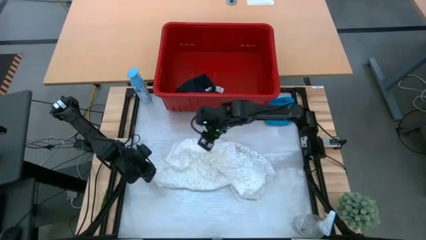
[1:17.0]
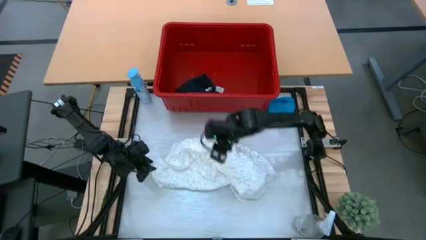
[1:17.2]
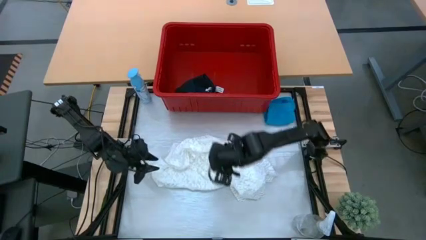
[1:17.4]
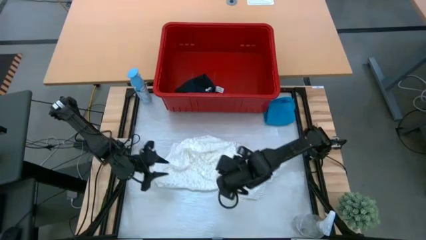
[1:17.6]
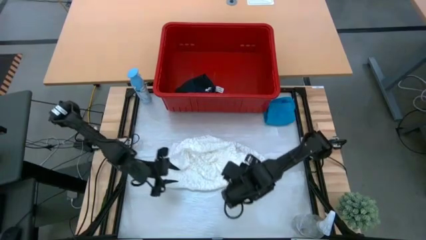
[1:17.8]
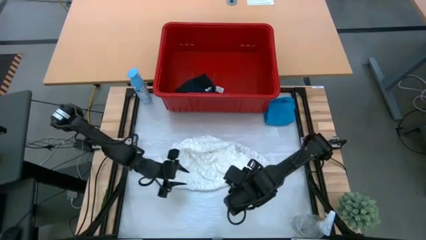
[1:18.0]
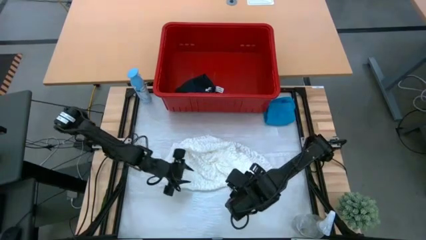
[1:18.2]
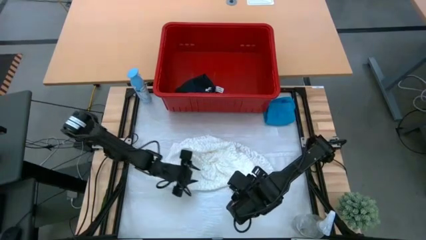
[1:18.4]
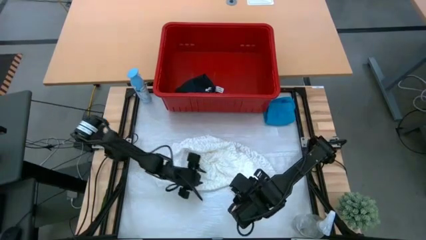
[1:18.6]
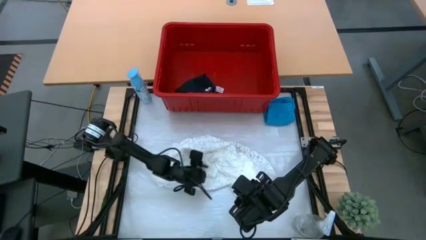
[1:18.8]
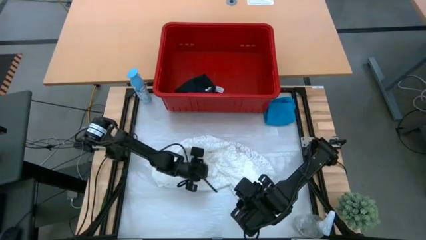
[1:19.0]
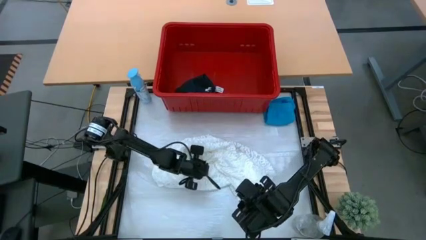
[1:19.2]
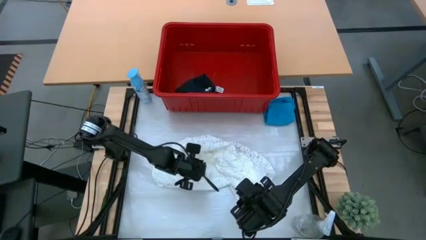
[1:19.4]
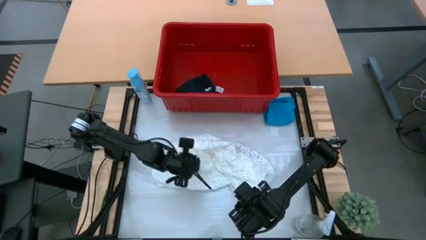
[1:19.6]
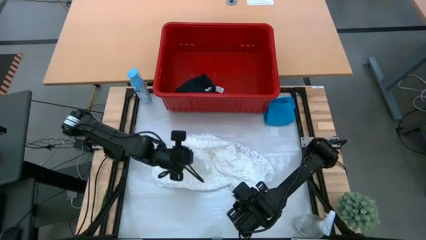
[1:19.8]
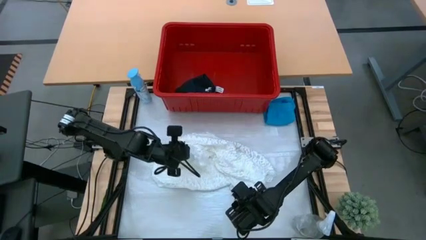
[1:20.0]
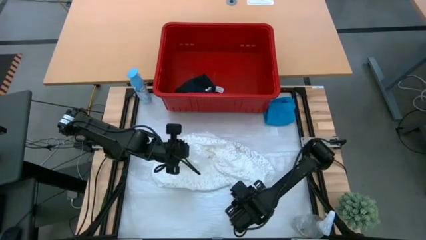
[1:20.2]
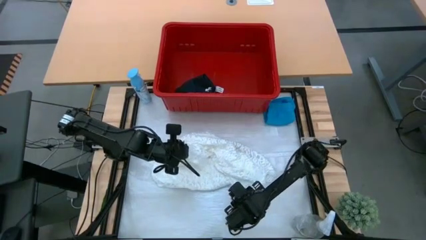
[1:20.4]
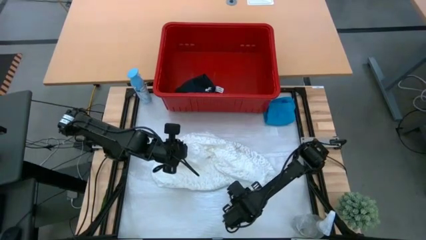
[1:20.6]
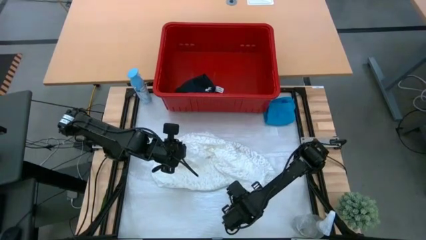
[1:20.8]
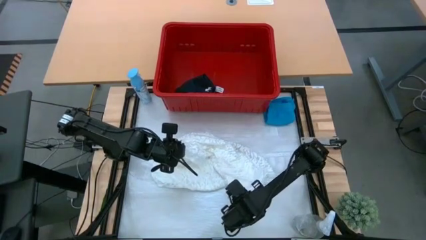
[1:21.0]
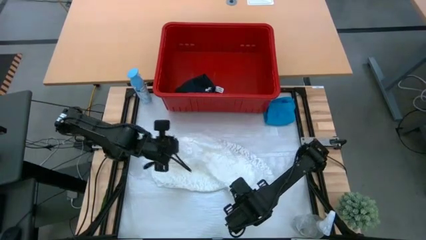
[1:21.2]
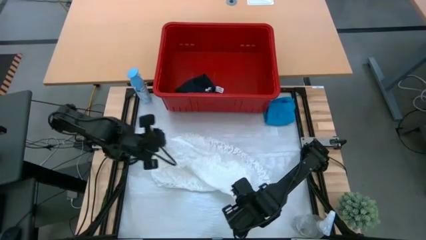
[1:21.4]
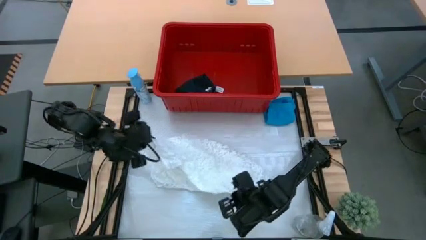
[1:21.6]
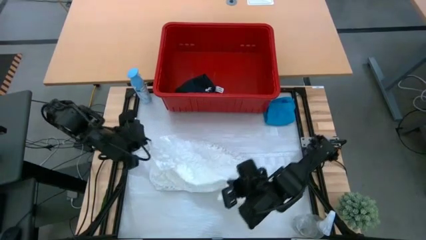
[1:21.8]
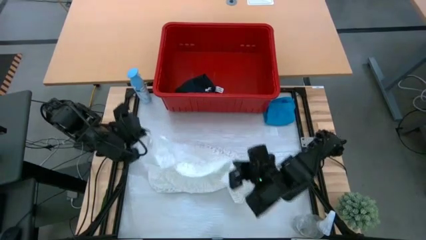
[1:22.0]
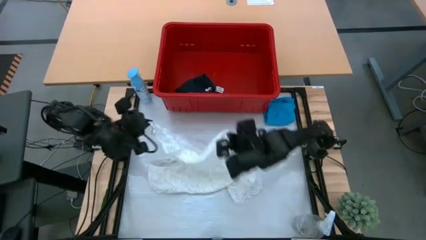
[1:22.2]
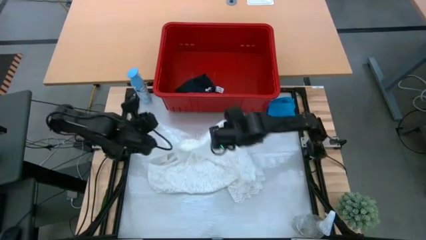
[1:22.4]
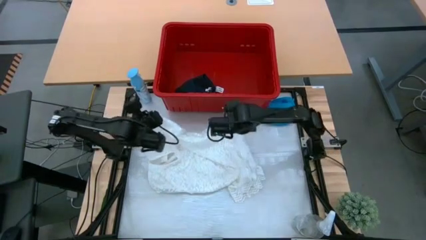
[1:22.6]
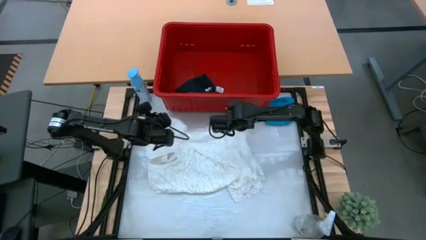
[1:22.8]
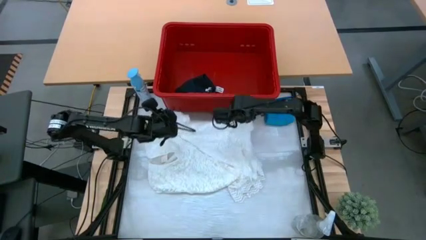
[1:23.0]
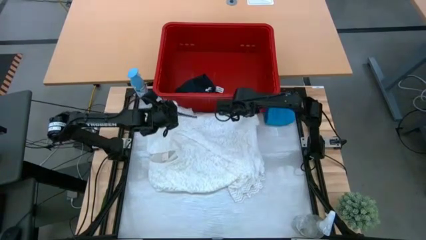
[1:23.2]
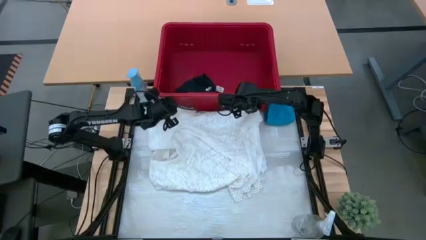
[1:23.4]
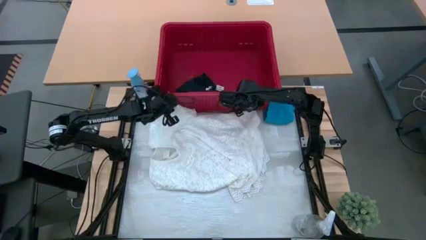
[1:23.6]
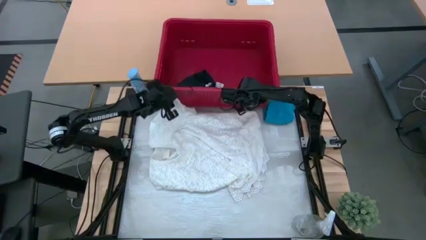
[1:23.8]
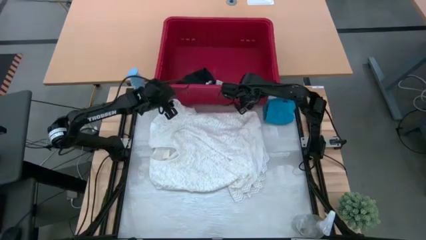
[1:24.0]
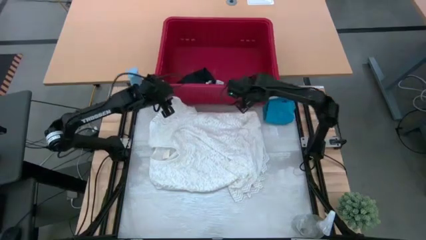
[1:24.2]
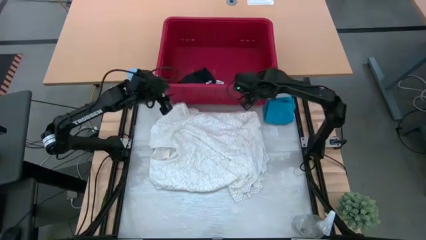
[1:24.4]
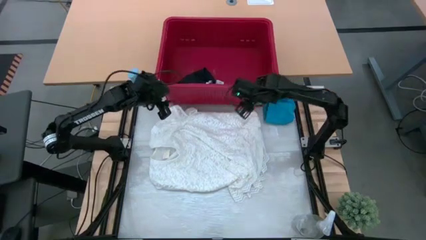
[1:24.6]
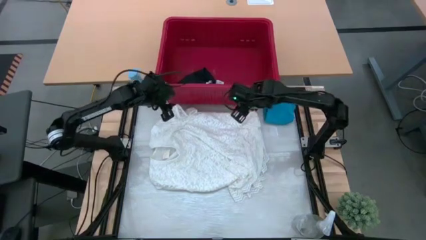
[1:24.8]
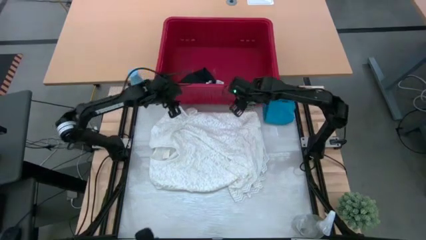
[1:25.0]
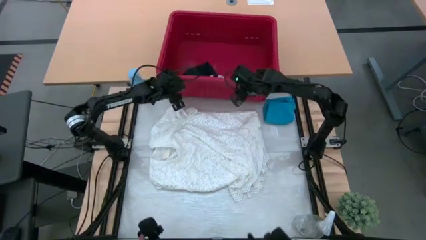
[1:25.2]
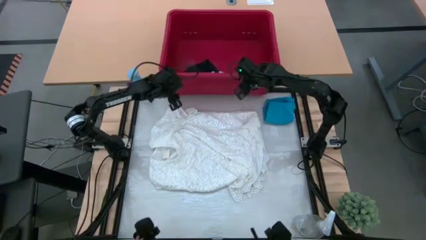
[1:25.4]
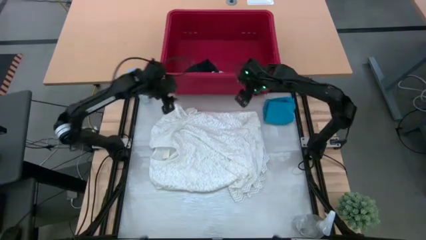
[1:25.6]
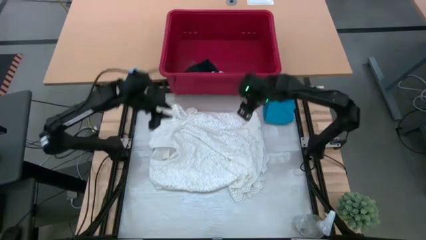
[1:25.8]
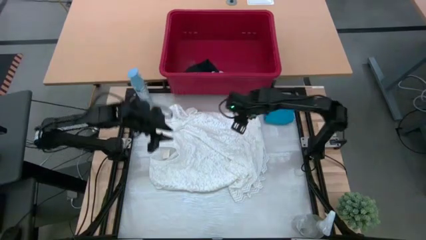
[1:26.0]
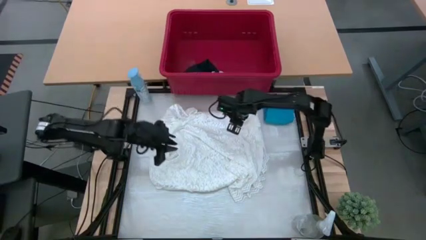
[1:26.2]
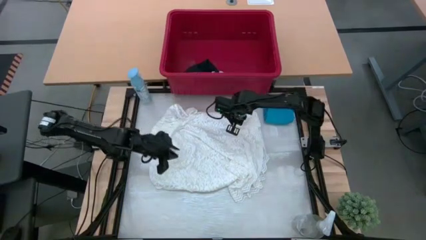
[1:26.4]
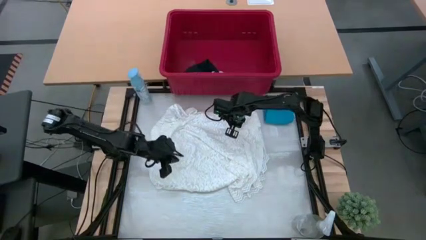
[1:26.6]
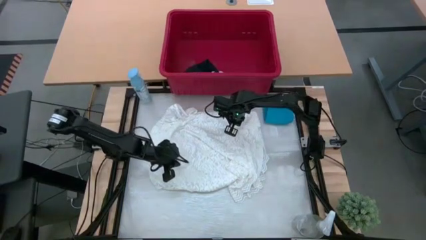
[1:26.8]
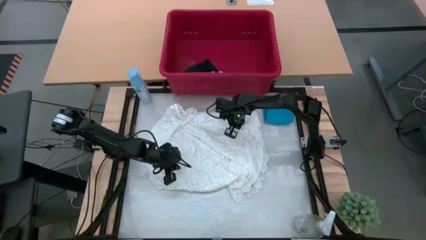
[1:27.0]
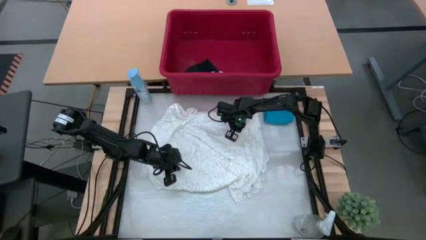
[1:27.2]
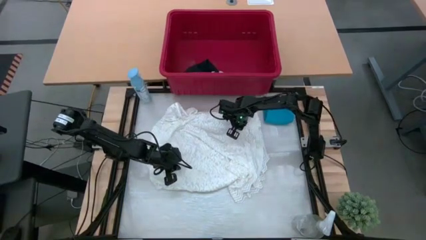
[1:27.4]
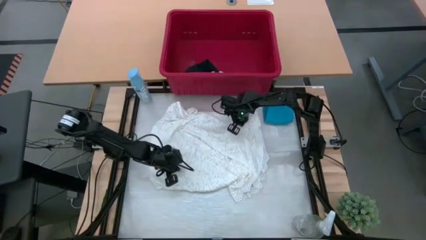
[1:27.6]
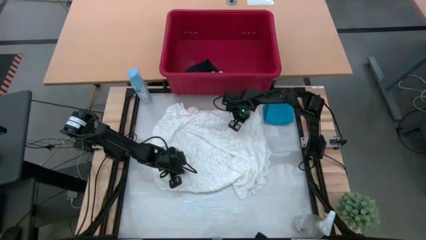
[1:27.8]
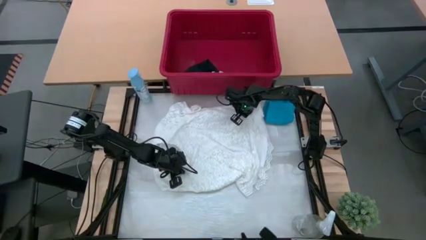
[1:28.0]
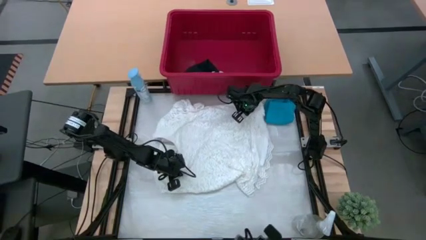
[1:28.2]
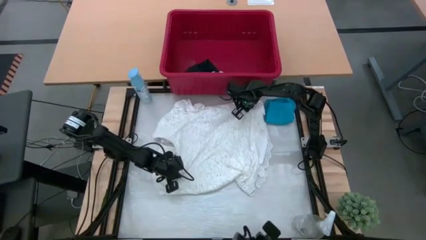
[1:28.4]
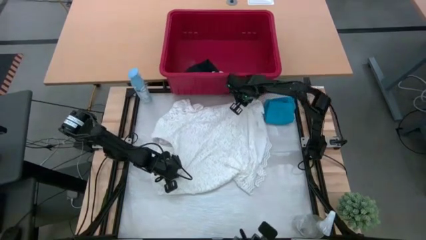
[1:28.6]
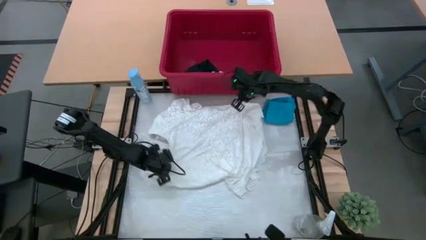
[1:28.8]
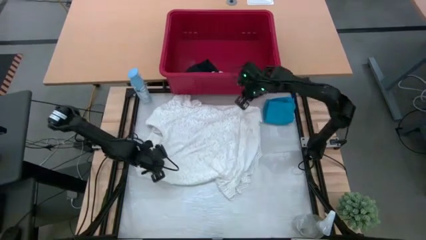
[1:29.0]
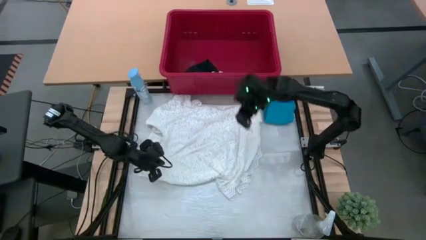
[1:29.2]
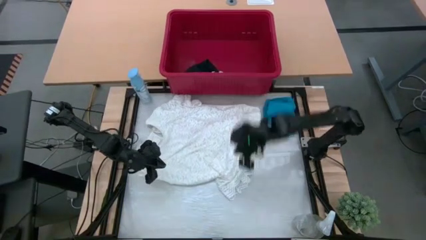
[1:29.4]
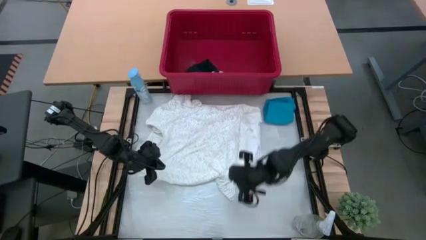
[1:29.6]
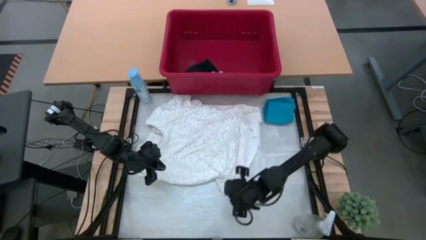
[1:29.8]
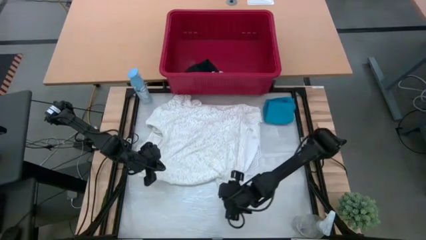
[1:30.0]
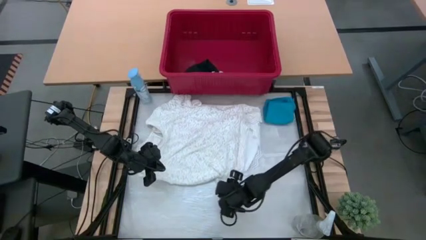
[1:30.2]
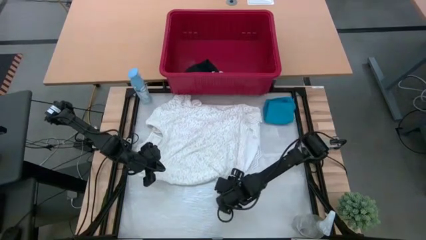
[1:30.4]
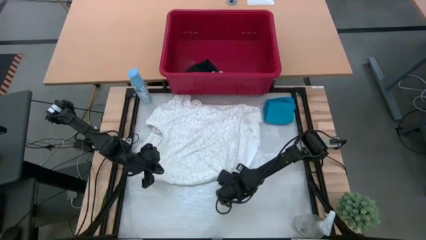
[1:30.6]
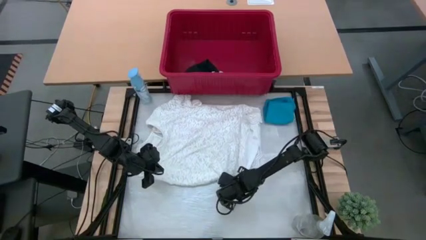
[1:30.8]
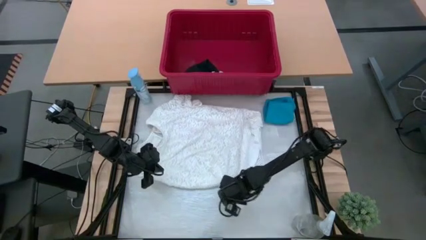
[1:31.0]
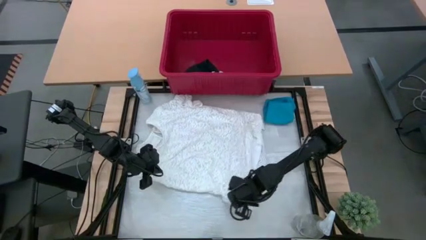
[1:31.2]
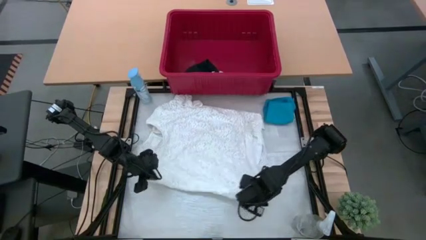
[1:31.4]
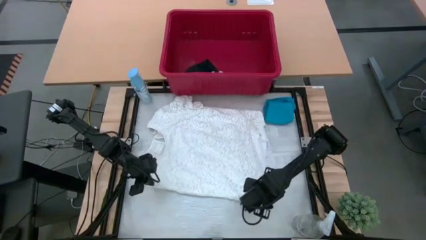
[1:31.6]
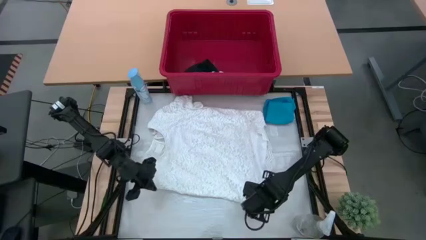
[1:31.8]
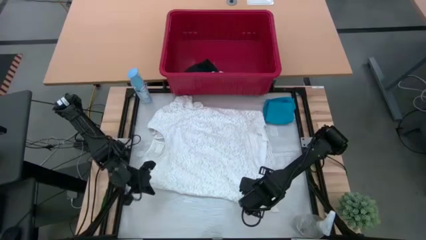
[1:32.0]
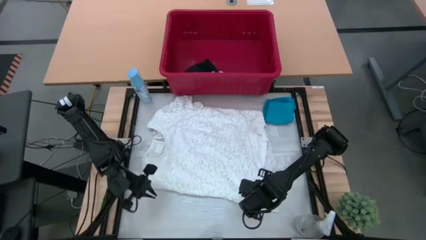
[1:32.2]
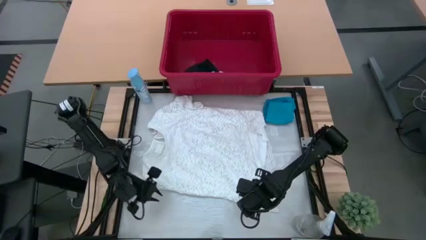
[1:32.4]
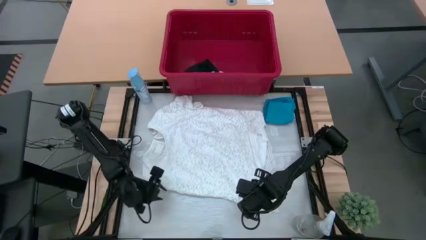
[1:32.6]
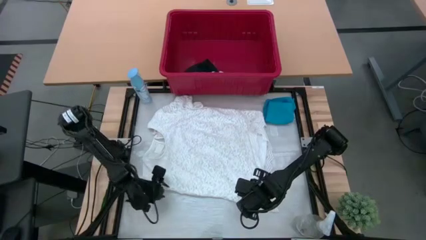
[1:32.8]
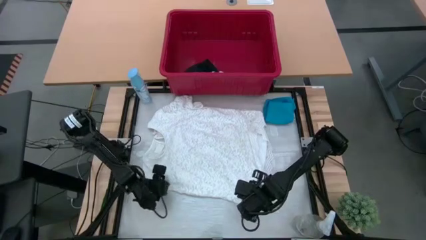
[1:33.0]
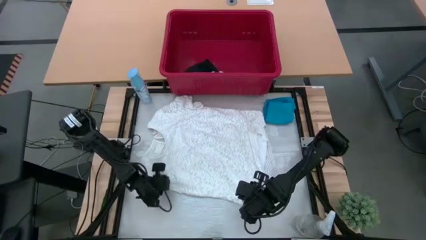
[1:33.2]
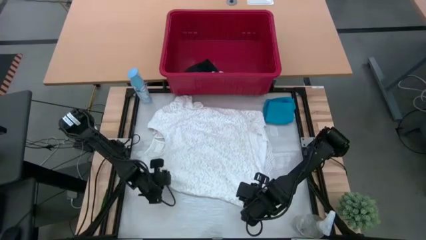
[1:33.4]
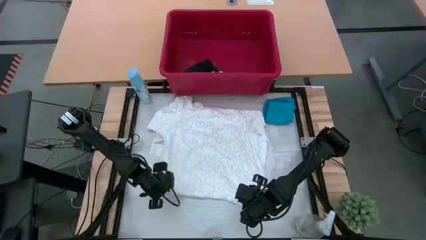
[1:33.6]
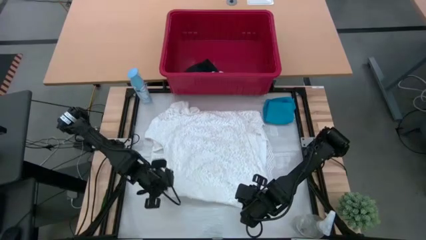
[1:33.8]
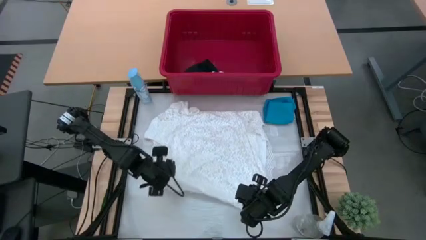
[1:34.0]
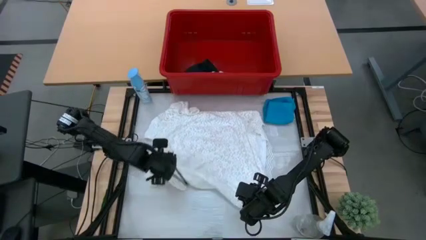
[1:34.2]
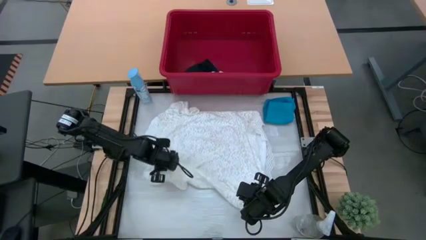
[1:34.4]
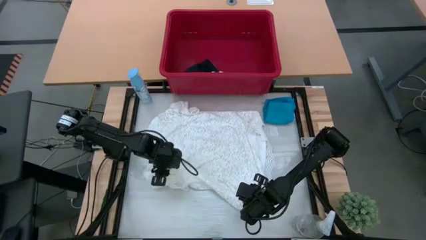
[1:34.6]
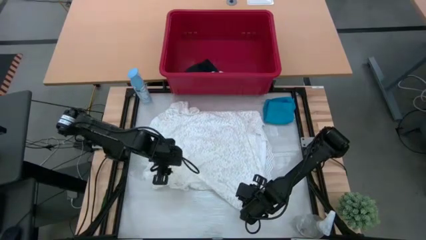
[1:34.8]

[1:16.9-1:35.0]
Task: Fold laundry
Fold the white blouse
